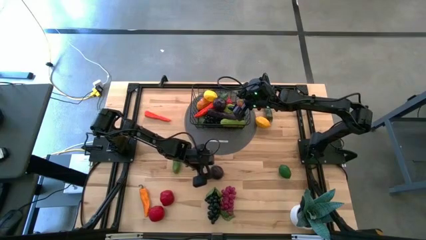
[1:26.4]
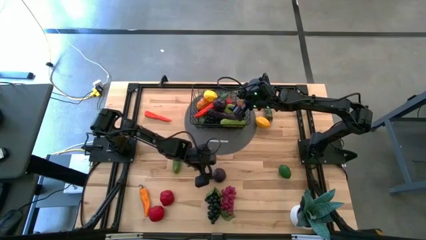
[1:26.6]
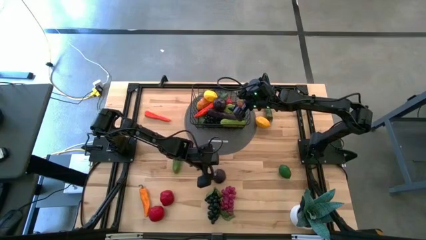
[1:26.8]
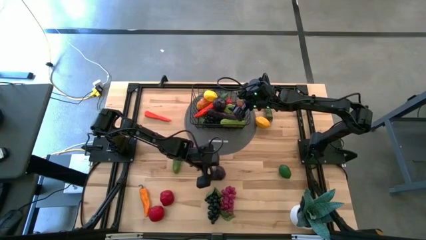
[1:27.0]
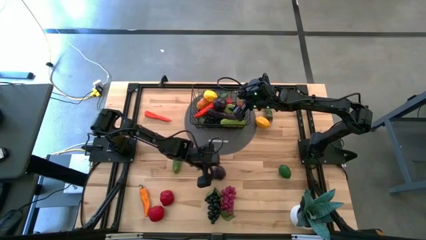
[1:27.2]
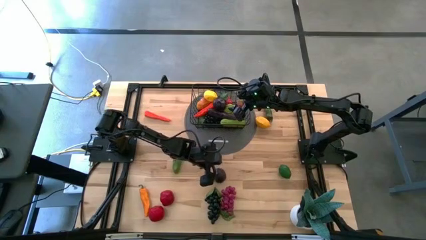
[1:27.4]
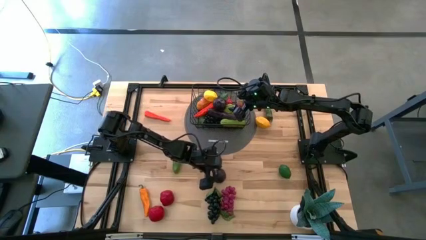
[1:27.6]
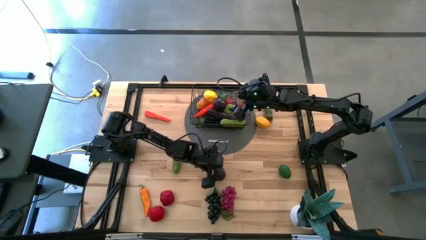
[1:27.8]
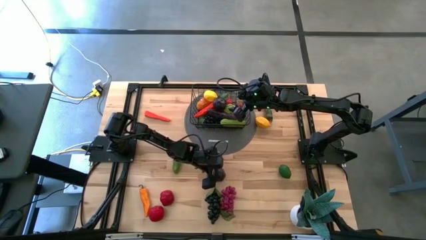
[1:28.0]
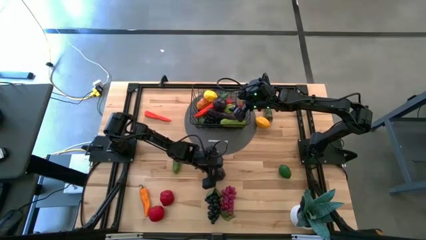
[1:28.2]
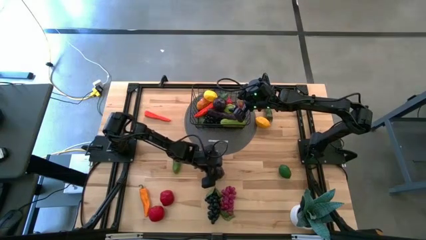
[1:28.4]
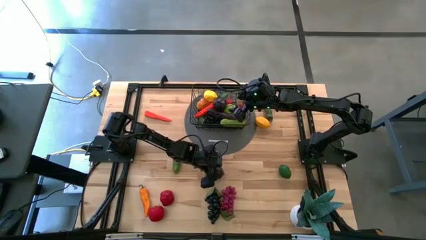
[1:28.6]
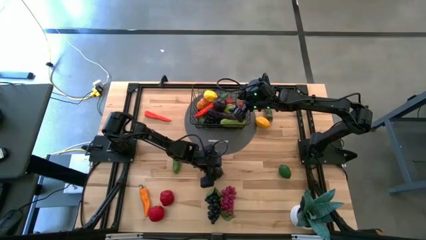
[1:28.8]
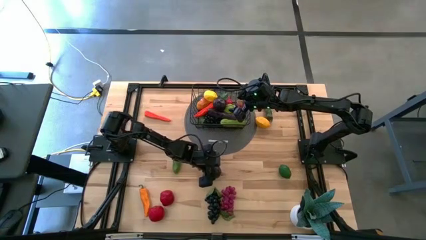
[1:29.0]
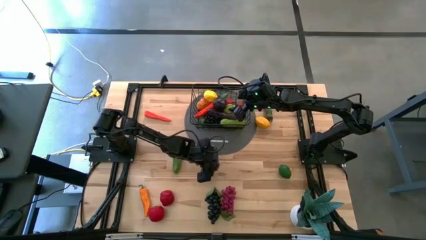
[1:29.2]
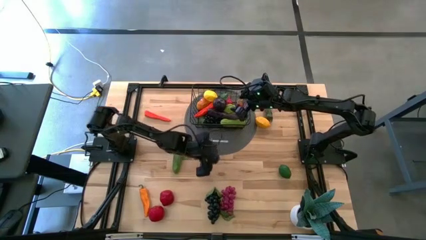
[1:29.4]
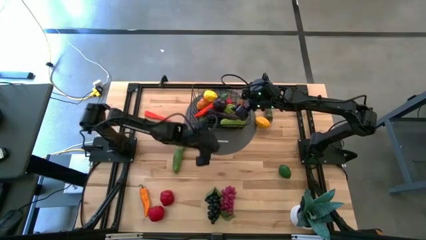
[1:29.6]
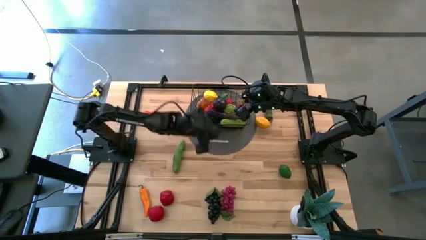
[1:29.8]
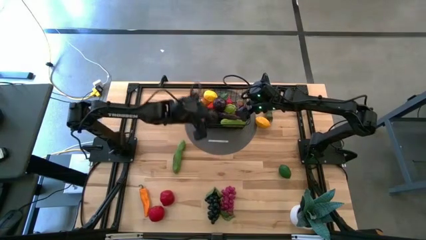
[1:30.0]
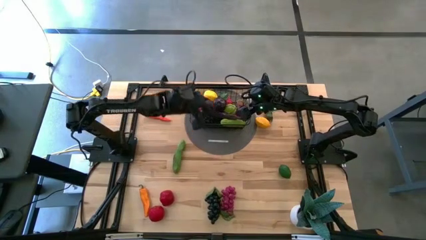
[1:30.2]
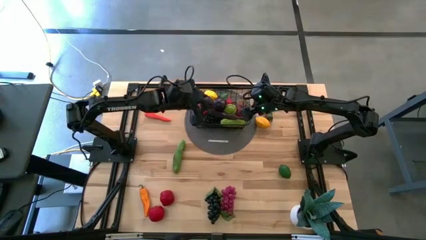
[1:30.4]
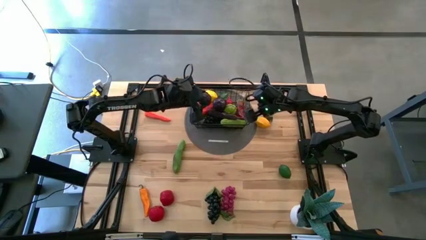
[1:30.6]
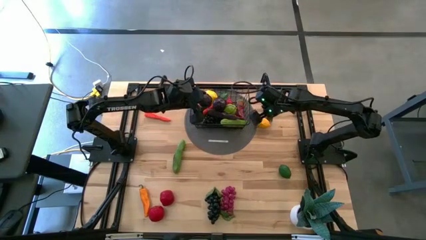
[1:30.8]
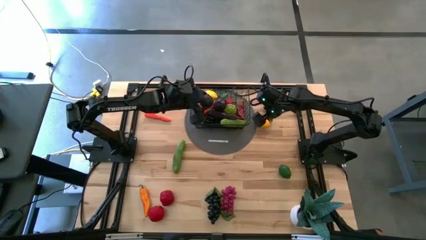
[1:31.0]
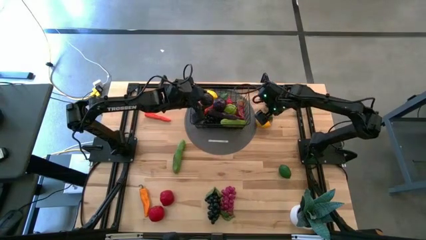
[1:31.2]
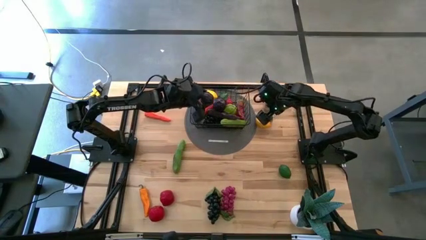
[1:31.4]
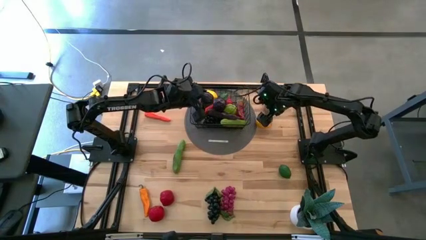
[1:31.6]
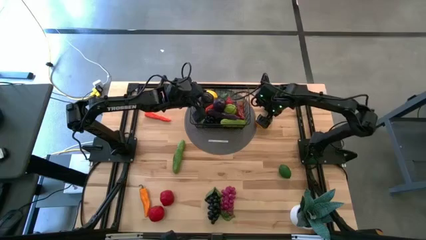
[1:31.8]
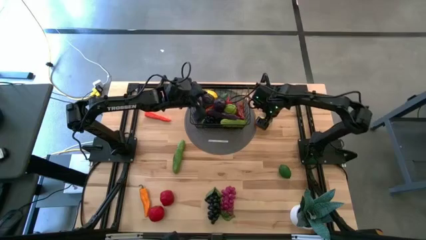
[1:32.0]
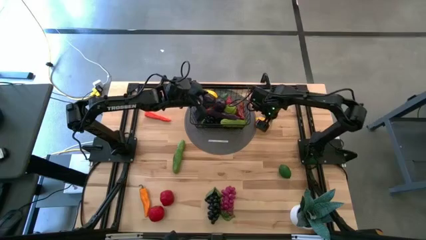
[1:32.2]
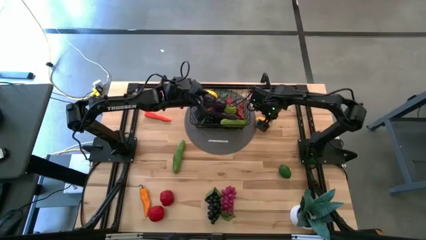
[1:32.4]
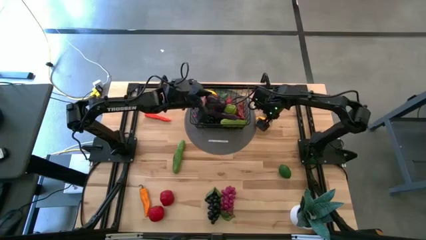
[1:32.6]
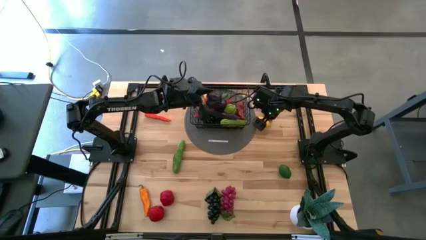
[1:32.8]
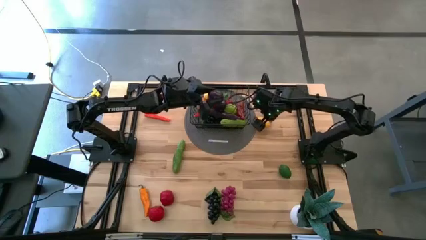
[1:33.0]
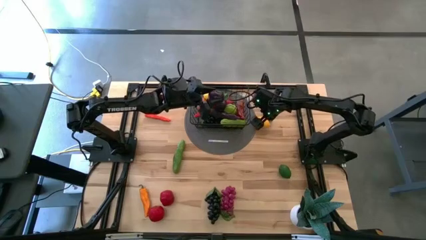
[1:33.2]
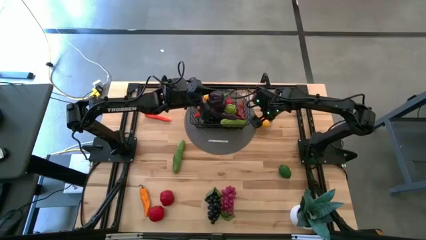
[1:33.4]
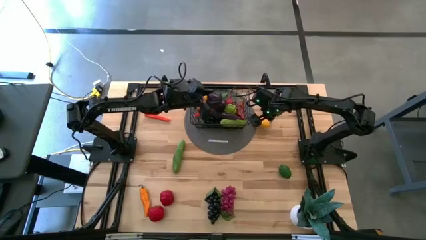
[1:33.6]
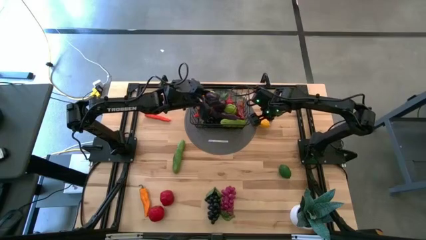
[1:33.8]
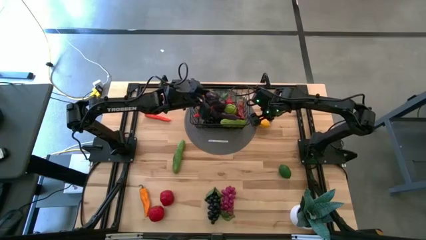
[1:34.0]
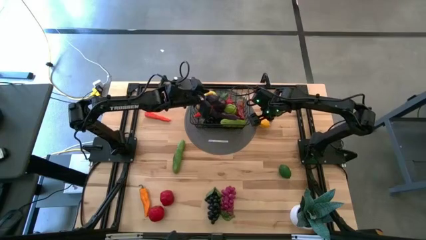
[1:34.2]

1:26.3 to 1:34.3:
Task: Build produce basket
Put the purple plum into the black wire basket

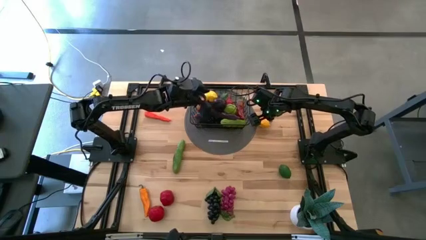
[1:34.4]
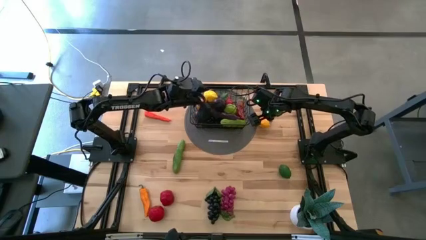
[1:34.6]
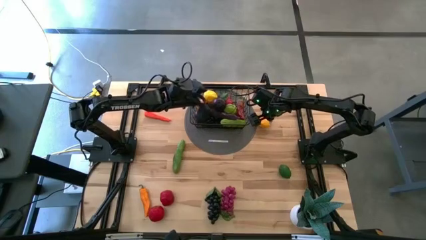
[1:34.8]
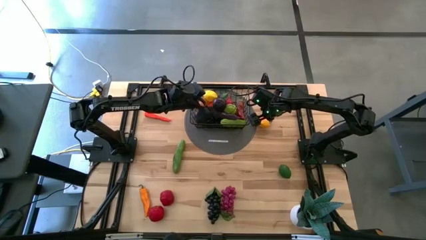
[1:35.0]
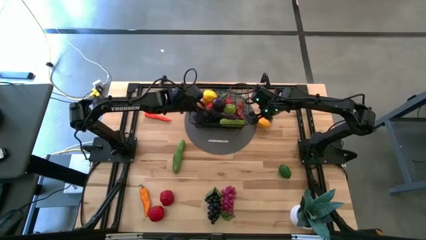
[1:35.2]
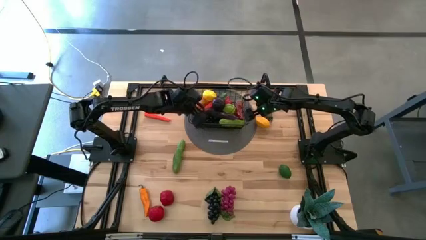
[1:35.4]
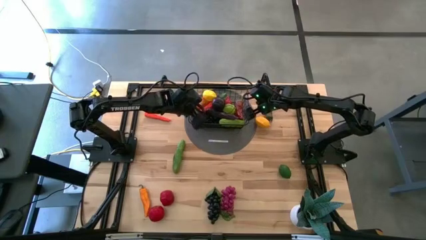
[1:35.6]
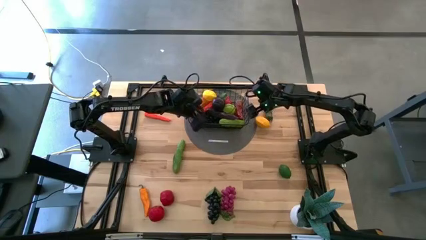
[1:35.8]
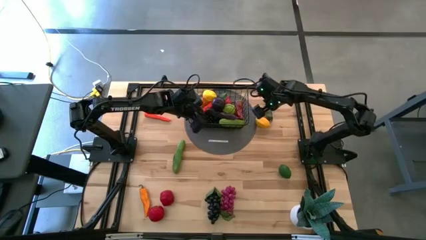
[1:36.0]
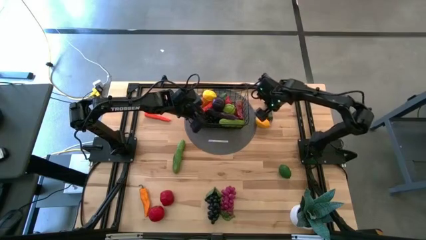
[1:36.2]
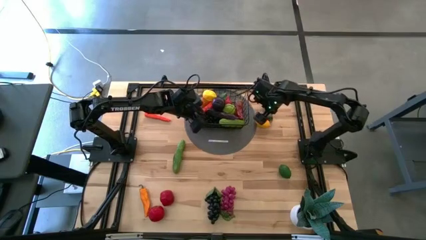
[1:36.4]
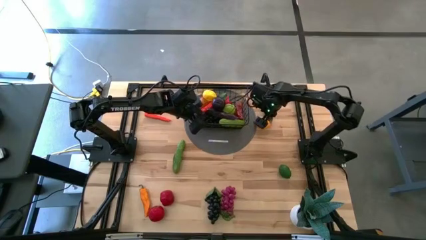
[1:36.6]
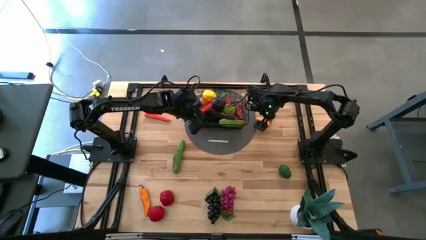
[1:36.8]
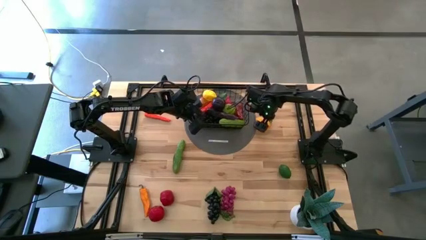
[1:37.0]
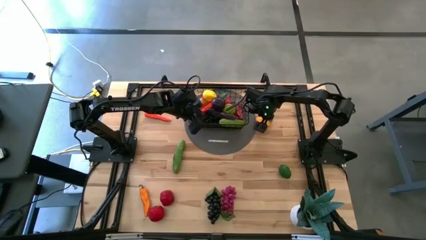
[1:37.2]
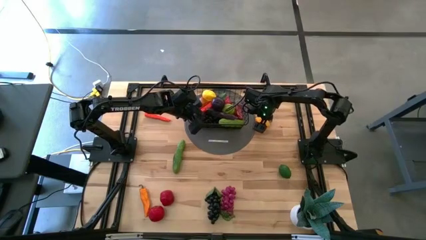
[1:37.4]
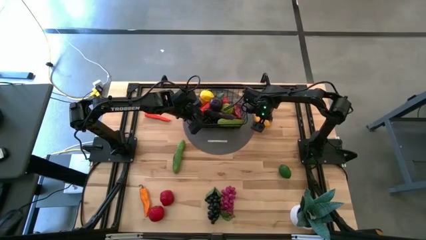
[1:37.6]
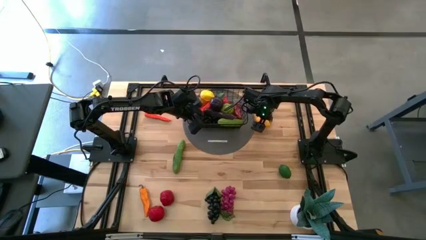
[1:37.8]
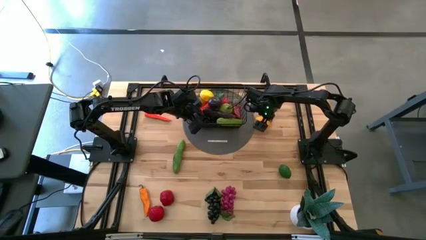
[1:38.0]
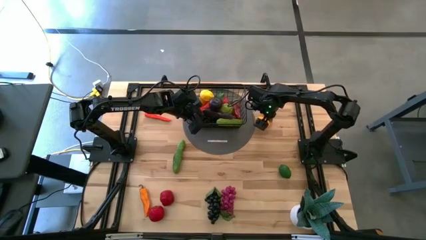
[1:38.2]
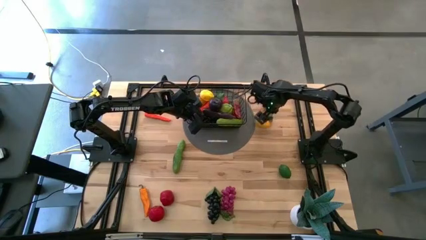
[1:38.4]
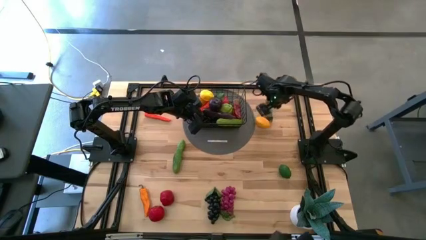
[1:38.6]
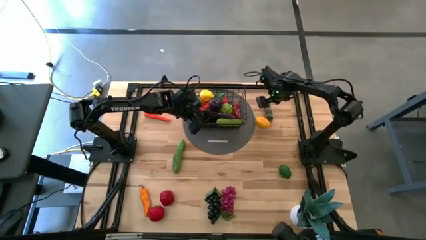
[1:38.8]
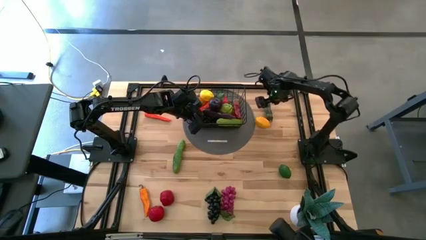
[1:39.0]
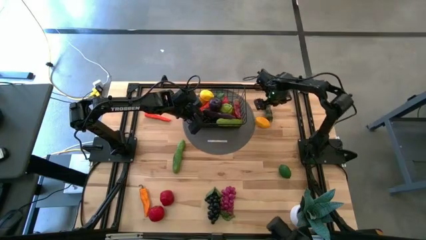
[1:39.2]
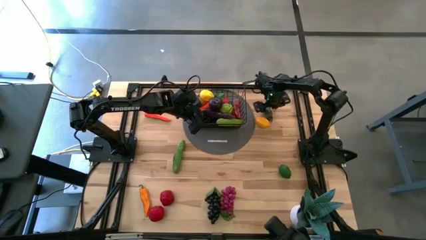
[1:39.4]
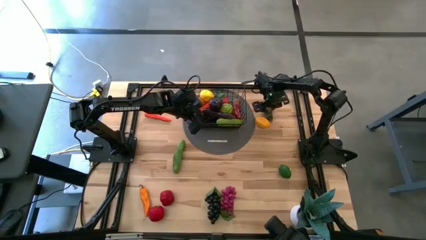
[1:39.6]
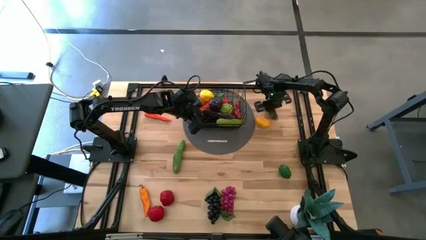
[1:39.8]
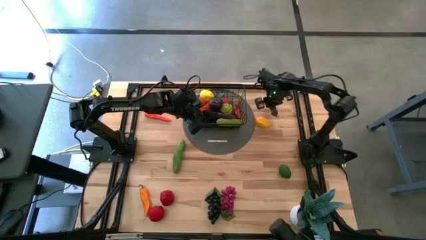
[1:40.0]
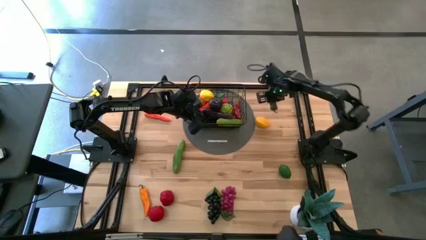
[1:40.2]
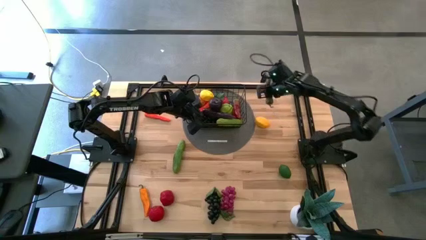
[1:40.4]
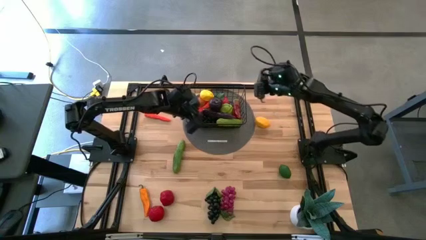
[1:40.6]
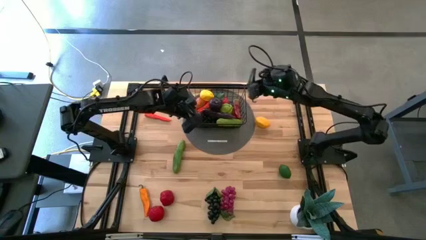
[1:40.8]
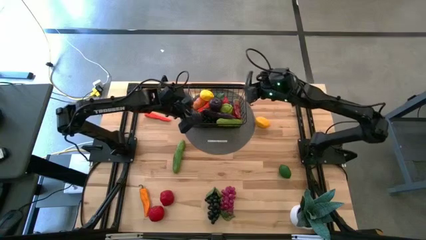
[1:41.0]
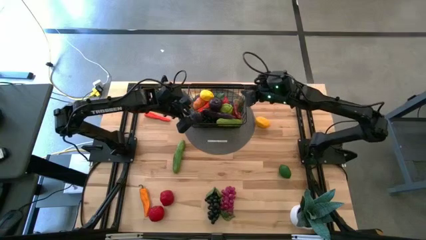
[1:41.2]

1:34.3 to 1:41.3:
Put the green chili pepper into the black wire basket

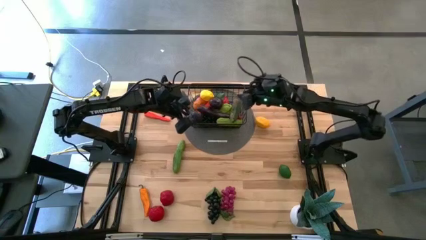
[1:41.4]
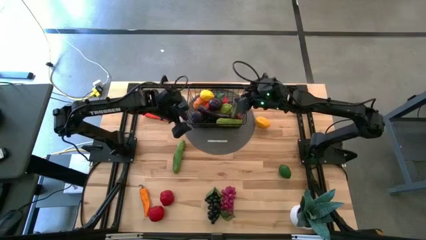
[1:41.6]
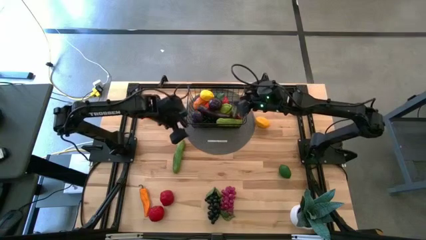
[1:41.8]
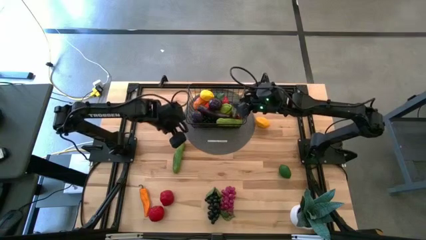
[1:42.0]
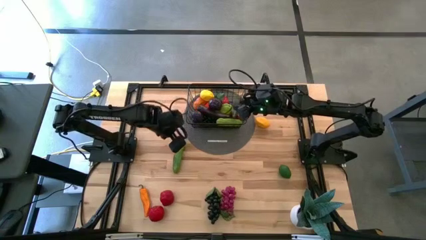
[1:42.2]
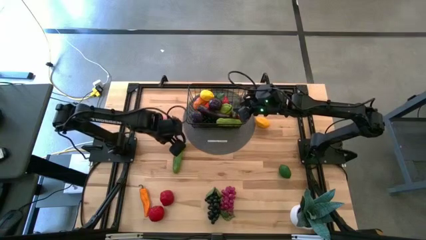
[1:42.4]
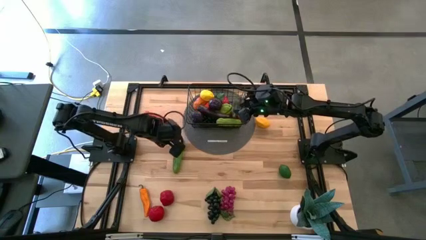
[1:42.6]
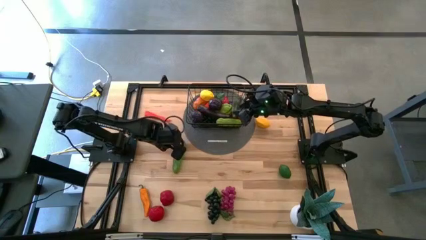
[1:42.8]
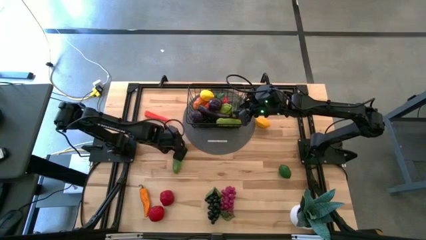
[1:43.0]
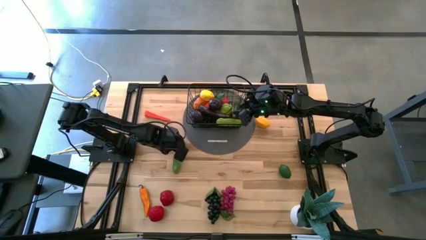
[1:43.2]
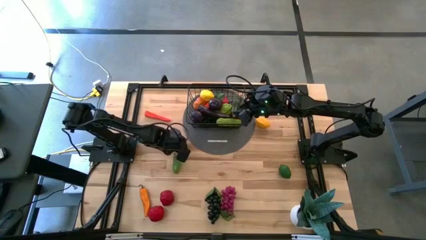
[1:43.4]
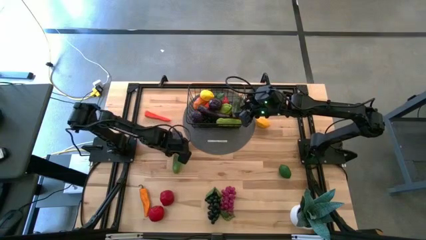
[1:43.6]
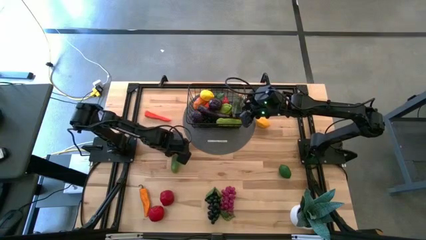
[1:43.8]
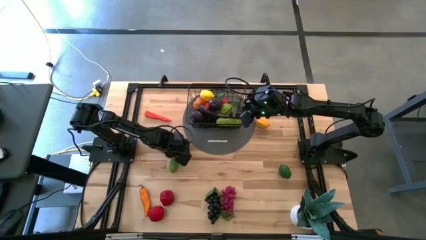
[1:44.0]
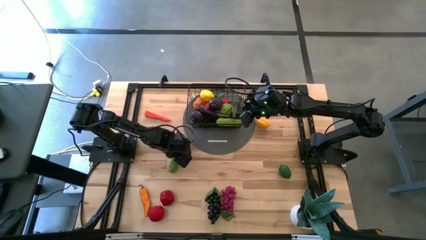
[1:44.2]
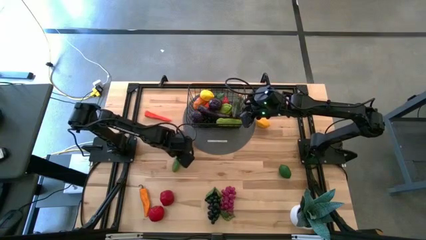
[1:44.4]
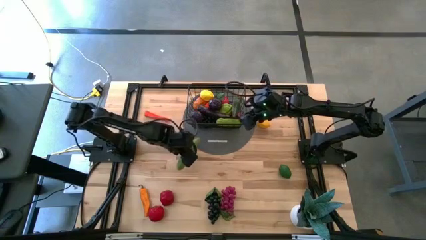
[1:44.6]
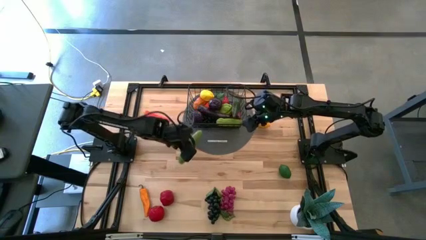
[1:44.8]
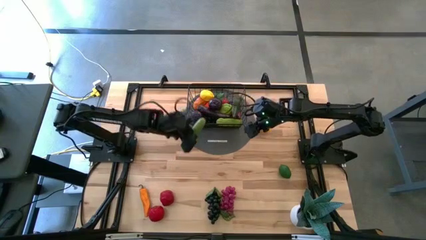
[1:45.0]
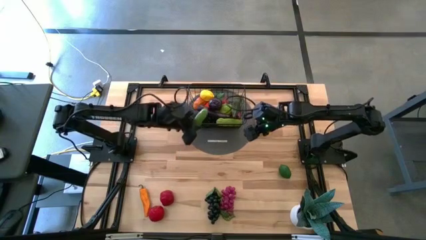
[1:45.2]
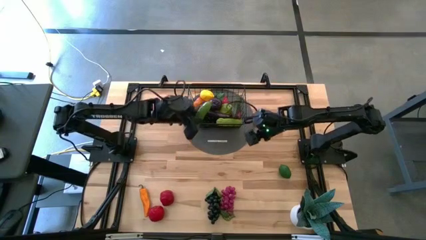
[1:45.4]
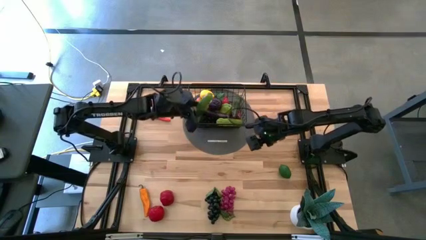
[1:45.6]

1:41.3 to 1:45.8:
Put the green cucumber into the black wire basket
